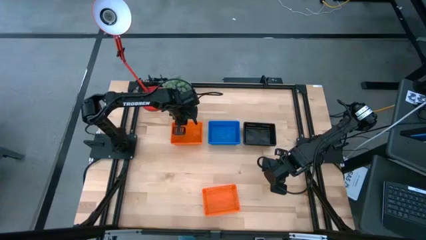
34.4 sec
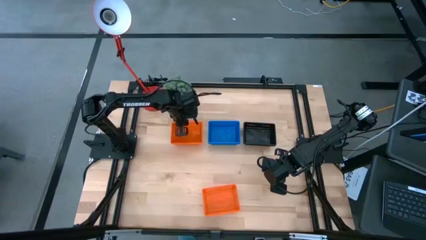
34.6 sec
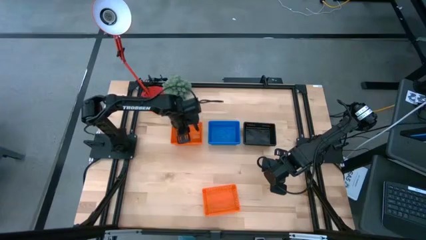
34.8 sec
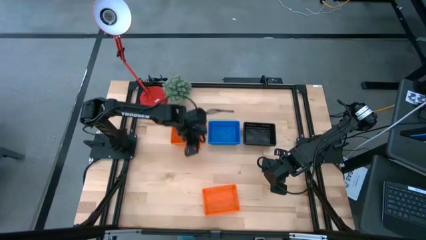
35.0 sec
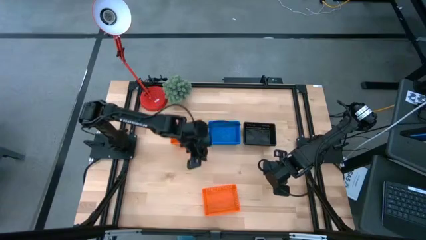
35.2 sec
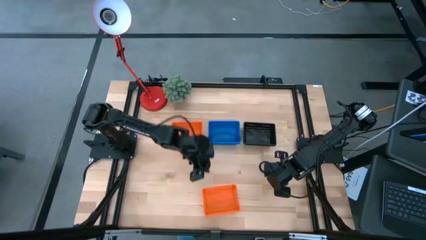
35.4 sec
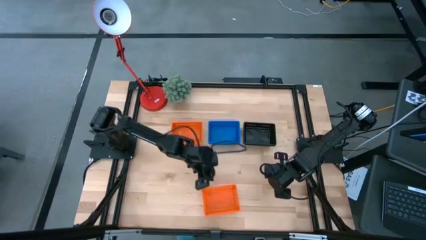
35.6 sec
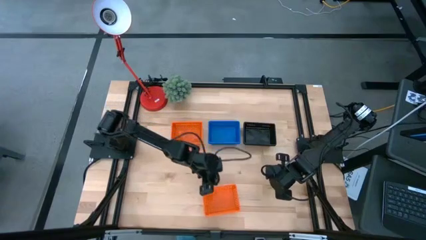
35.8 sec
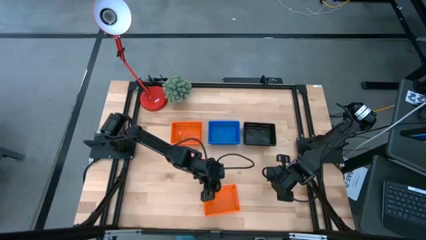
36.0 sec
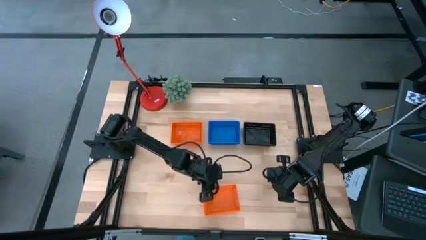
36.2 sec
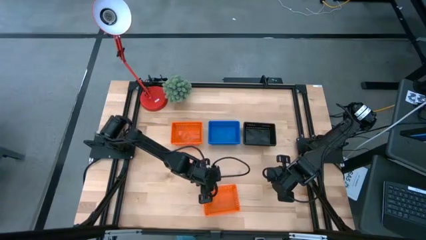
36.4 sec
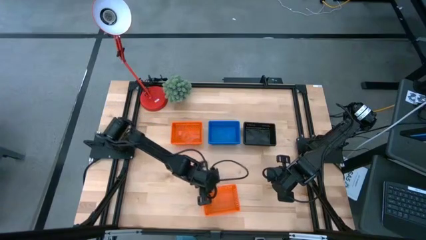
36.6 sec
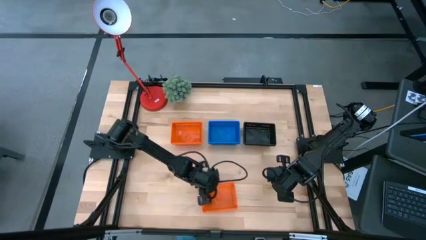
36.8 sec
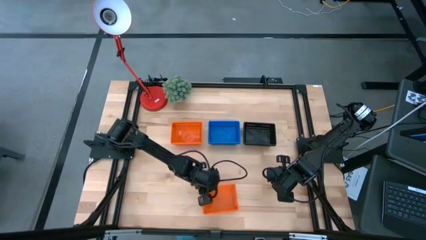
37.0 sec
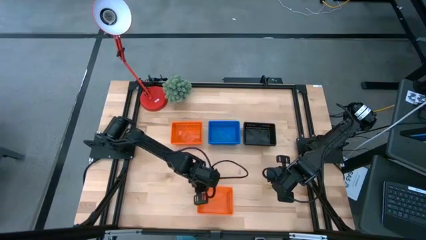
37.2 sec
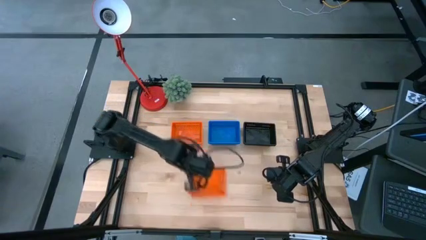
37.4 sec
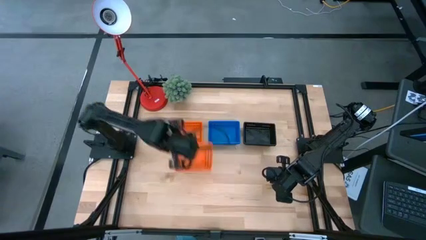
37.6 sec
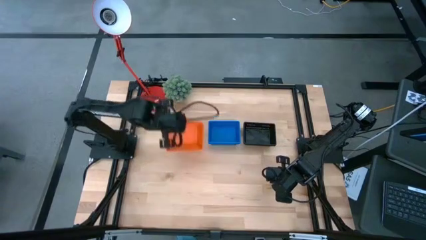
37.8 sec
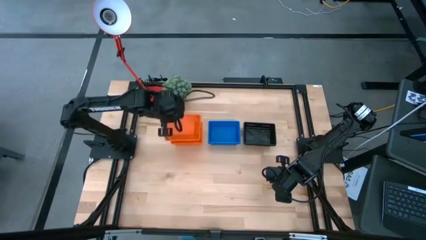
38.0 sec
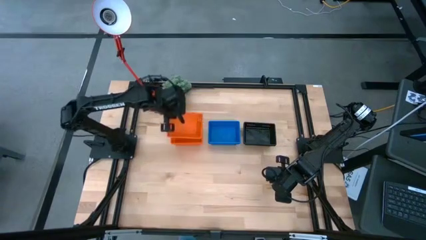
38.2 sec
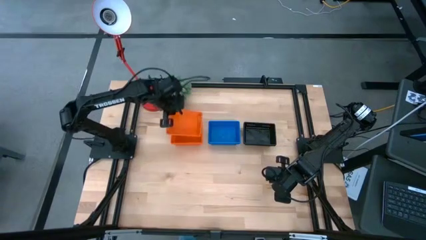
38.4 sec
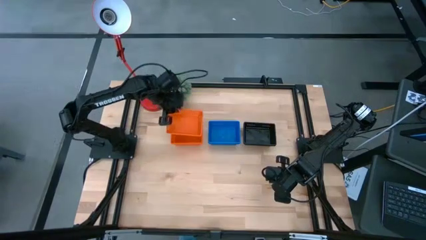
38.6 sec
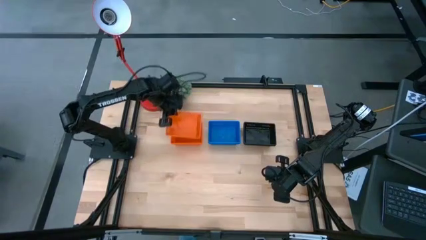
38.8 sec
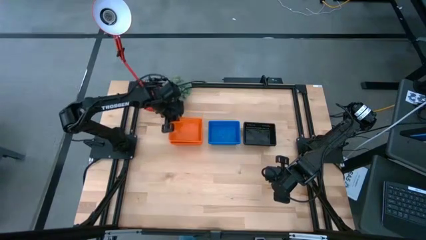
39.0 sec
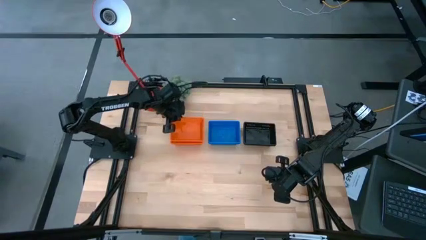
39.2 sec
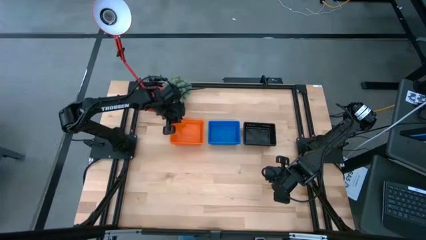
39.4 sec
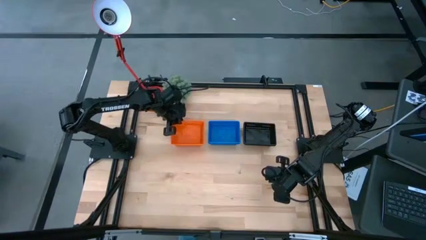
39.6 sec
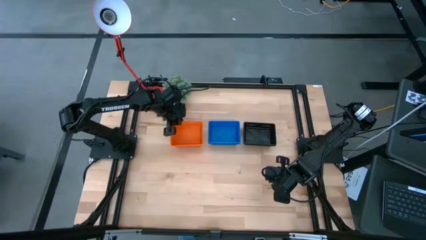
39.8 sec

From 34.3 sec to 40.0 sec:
Stack the bottom orange bin on the top orange bin

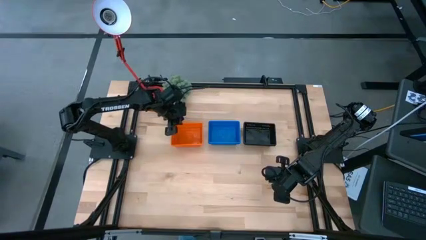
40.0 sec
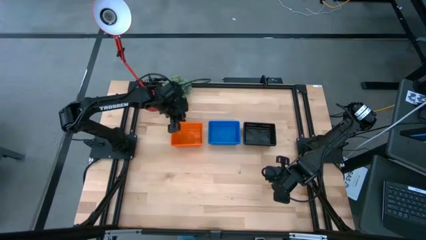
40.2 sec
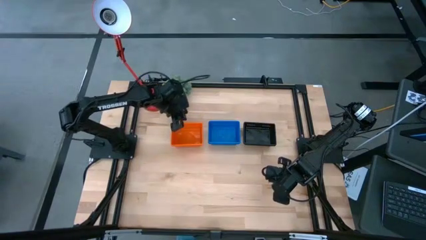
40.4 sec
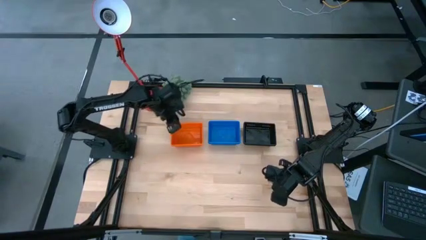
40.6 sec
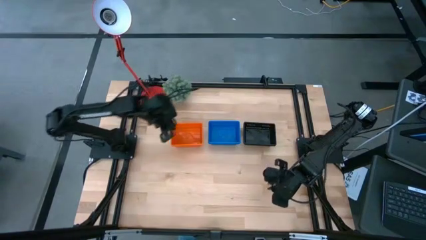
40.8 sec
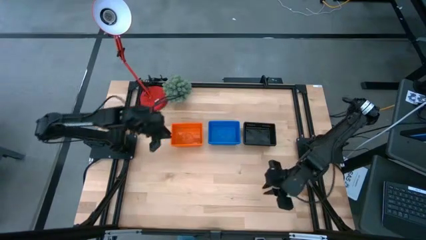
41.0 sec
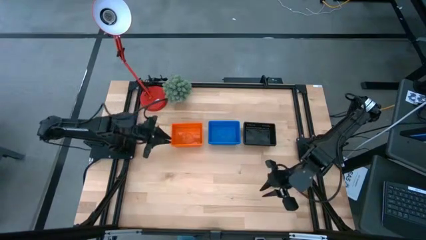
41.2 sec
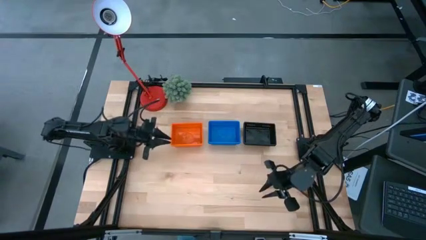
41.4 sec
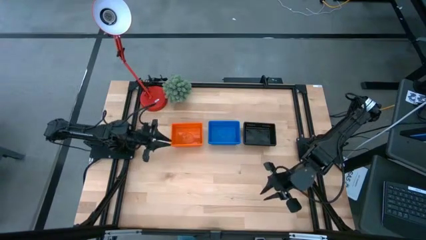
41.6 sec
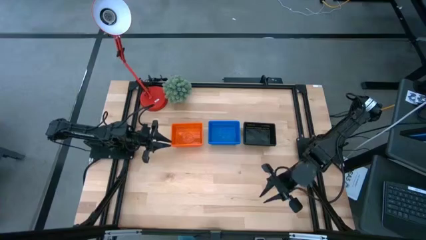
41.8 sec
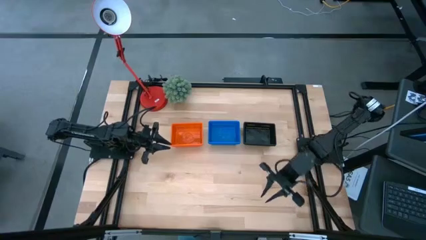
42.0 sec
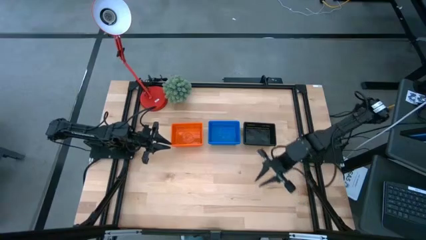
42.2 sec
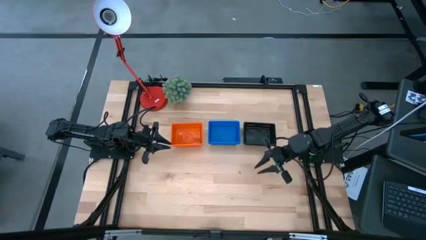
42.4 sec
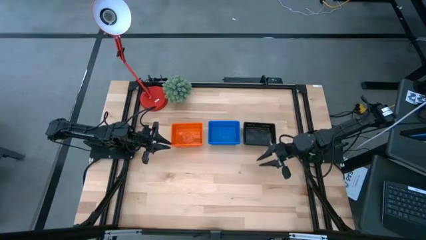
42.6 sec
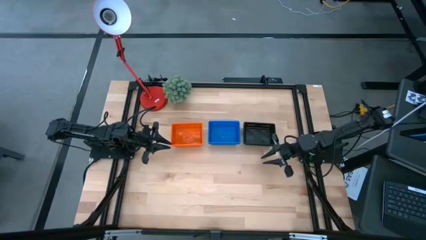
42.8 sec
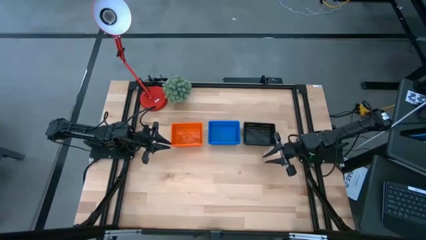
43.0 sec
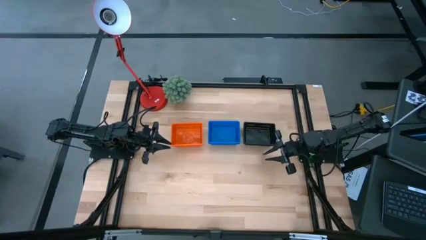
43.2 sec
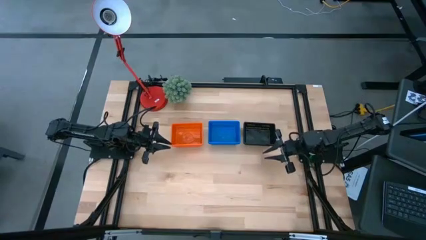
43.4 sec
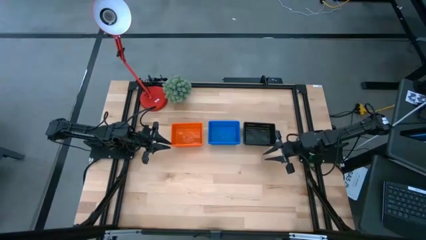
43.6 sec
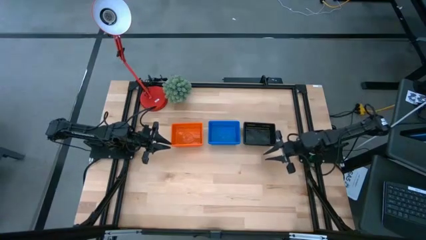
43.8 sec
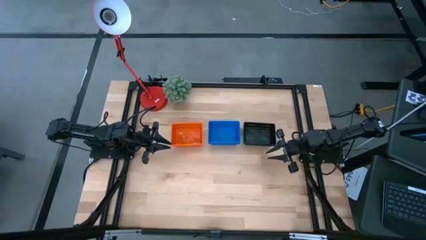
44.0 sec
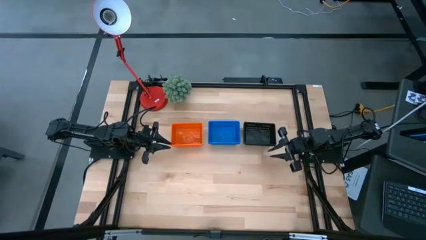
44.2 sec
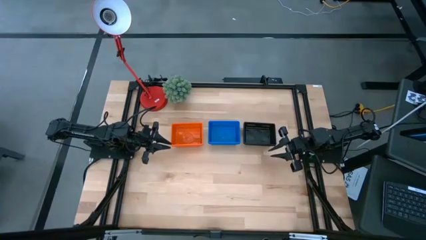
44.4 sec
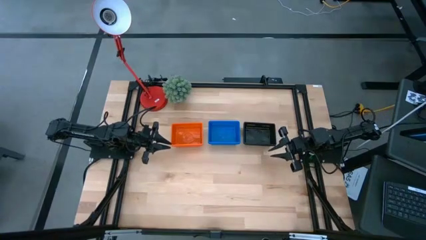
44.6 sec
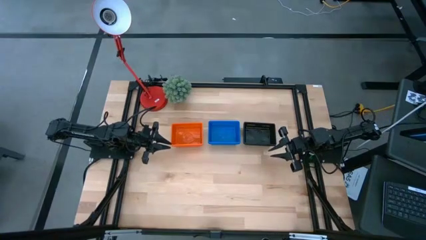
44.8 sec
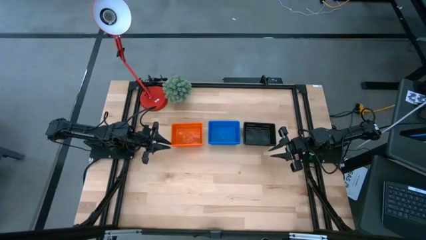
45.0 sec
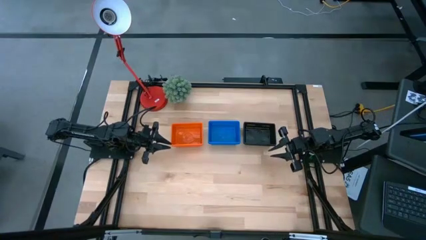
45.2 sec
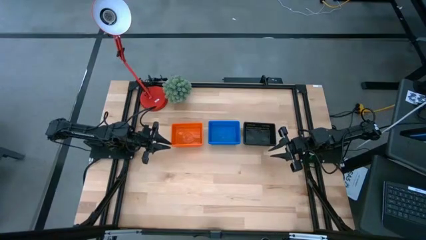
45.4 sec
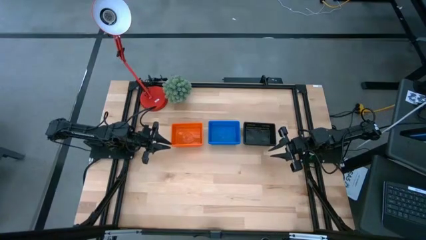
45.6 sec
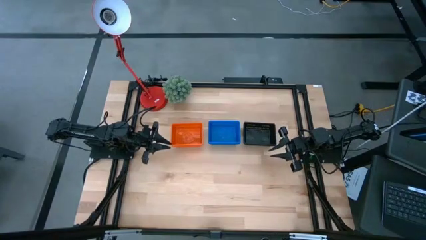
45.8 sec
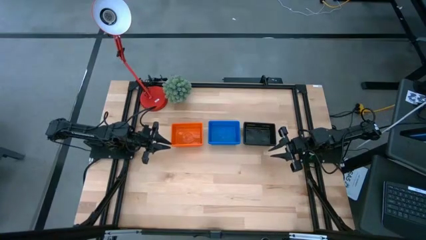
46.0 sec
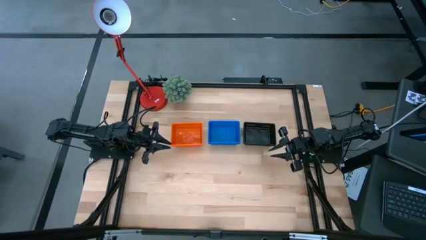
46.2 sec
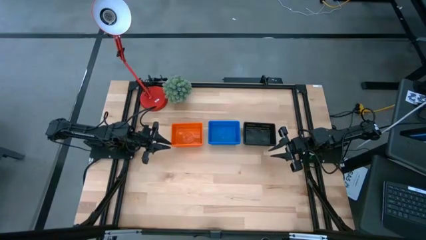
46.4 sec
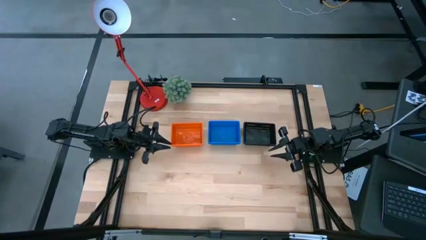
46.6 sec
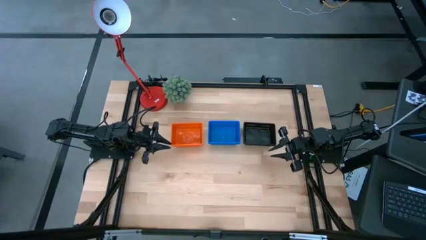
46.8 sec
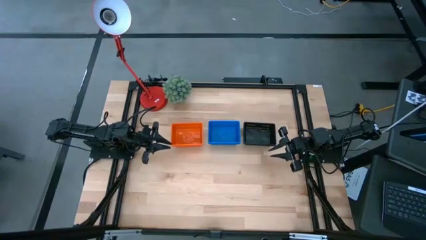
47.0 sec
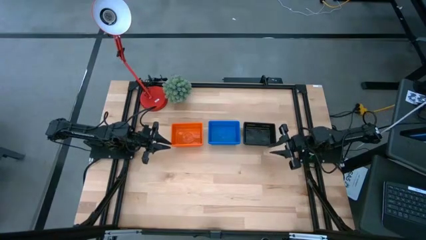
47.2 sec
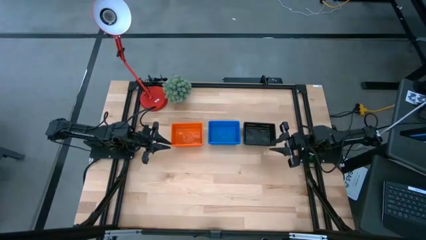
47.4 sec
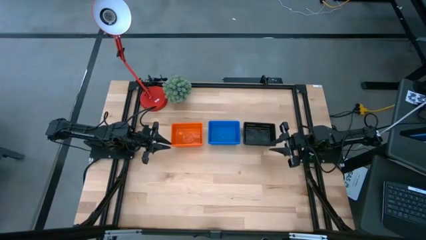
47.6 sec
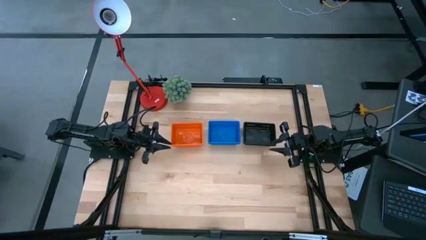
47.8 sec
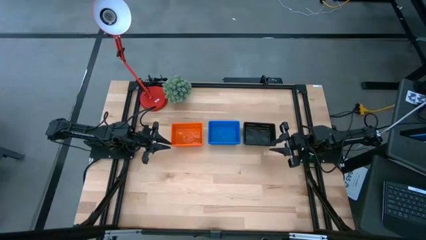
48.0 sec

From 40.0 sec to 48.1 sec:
Return to Home Position

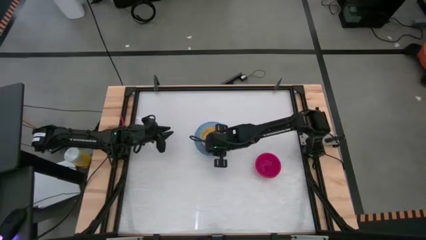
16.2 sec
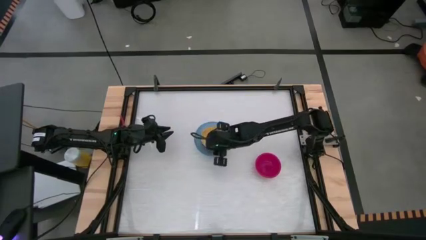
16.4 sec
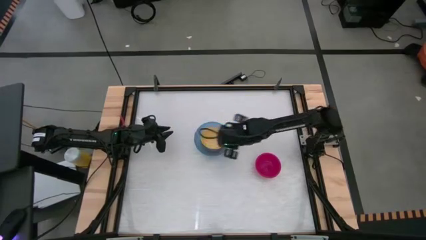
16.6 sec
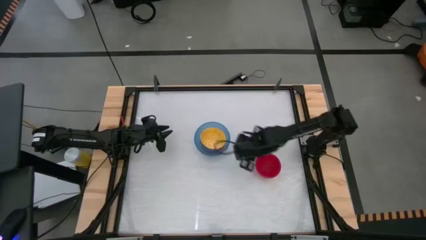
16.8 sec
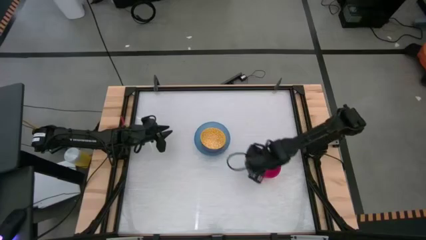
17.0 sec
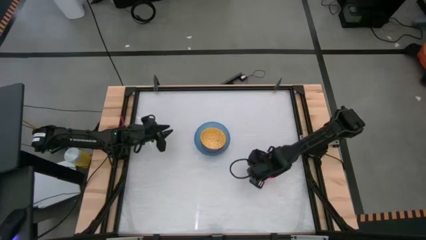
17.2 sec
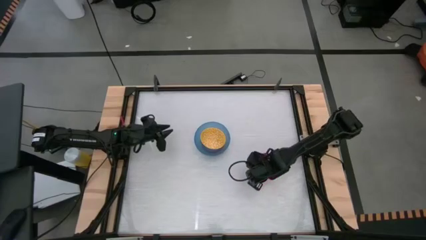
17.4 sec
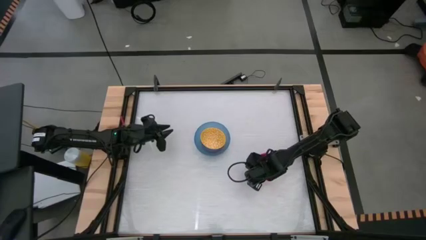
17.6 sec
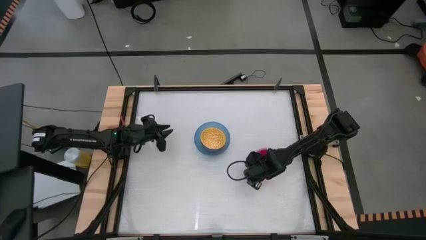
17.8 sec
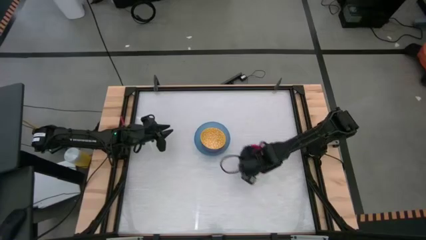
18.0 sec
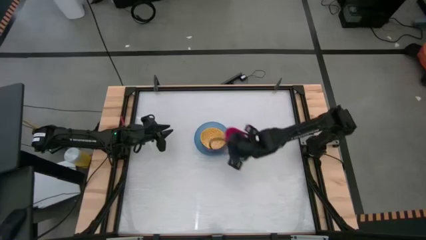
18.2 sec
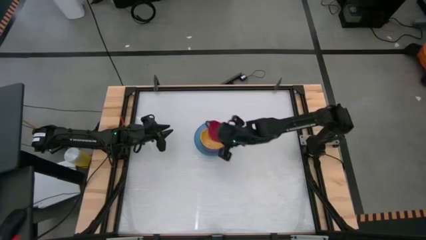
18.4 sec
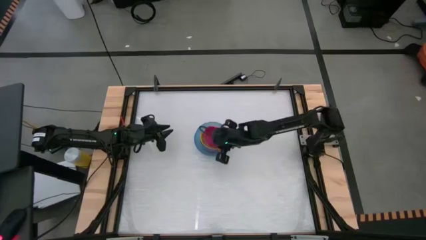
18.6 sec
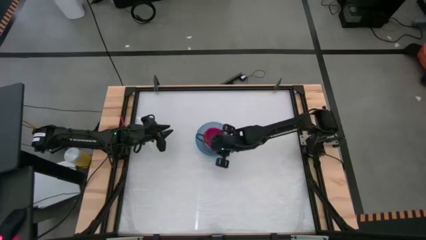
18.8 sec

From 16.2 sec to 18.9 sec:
Stack the red bowl into the yellow bowl
